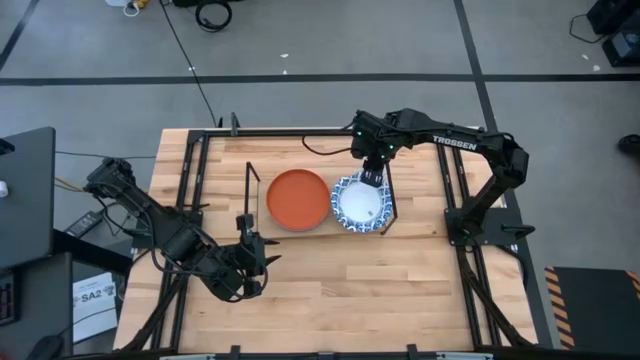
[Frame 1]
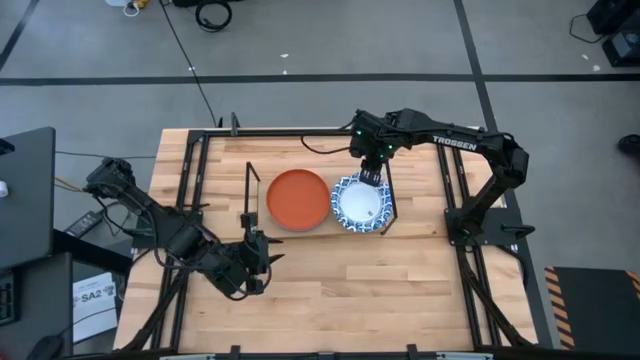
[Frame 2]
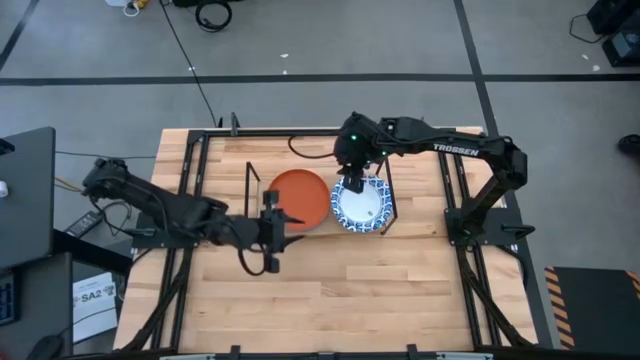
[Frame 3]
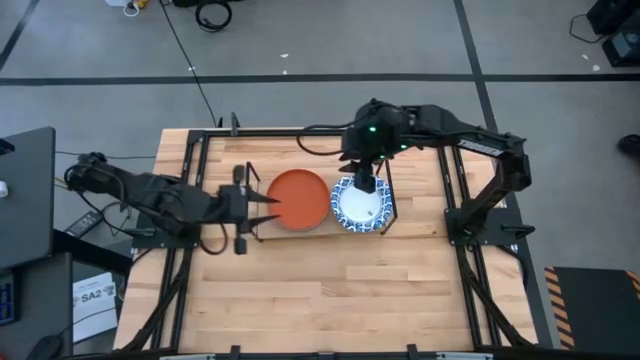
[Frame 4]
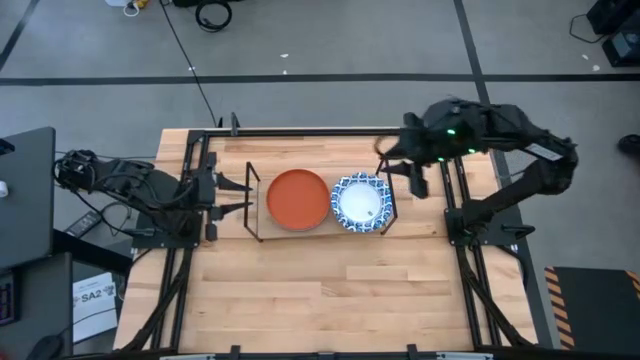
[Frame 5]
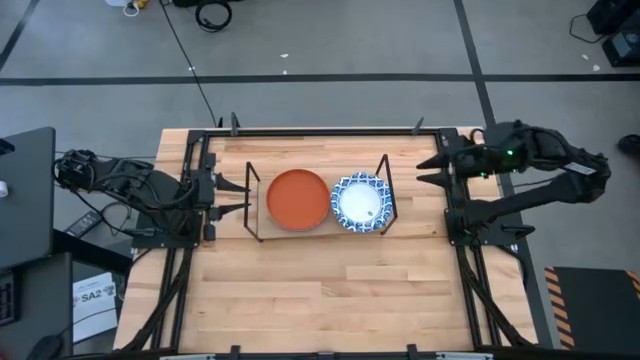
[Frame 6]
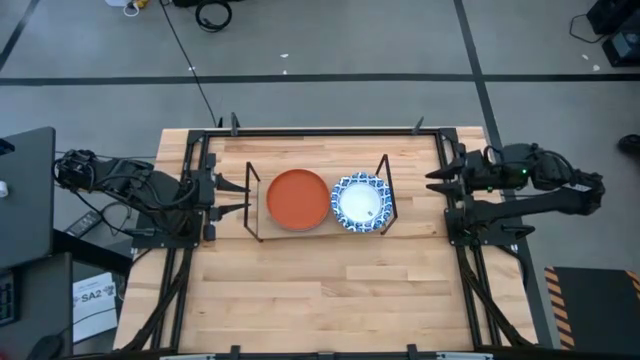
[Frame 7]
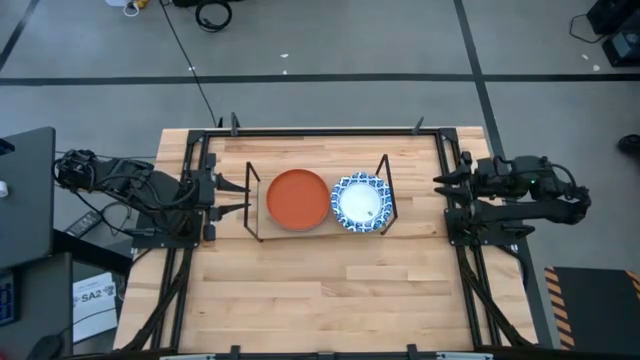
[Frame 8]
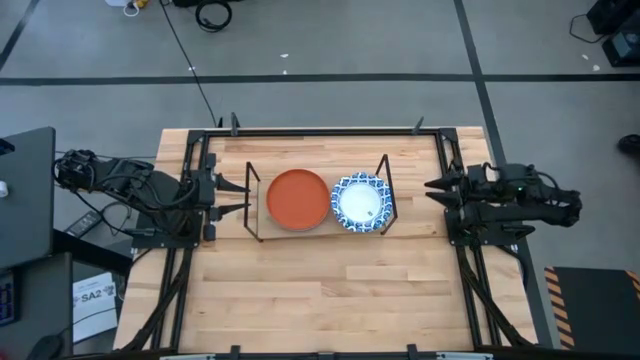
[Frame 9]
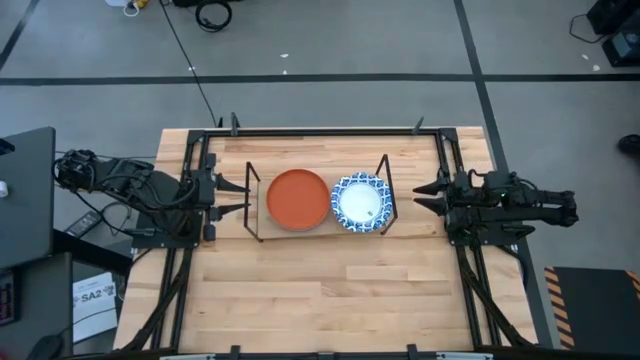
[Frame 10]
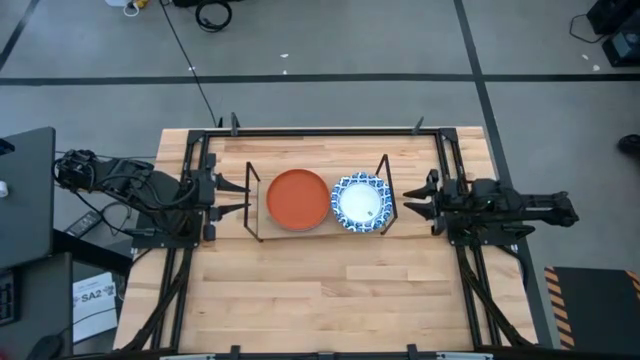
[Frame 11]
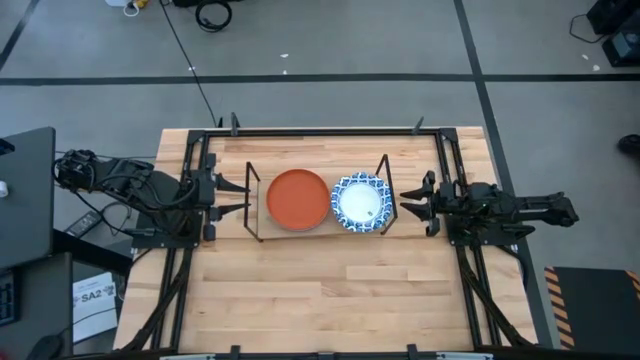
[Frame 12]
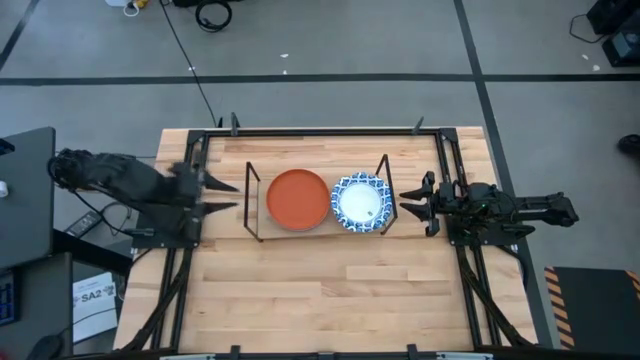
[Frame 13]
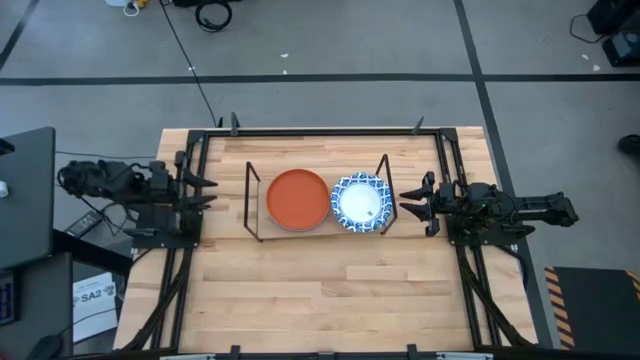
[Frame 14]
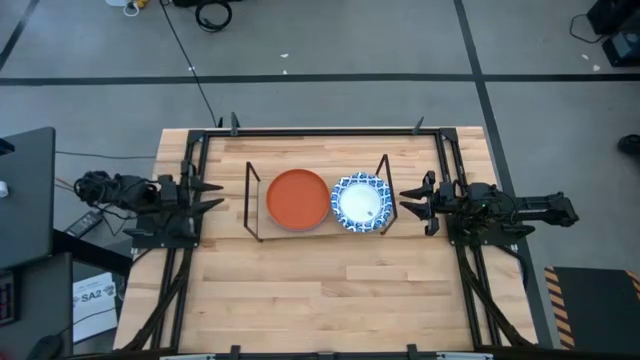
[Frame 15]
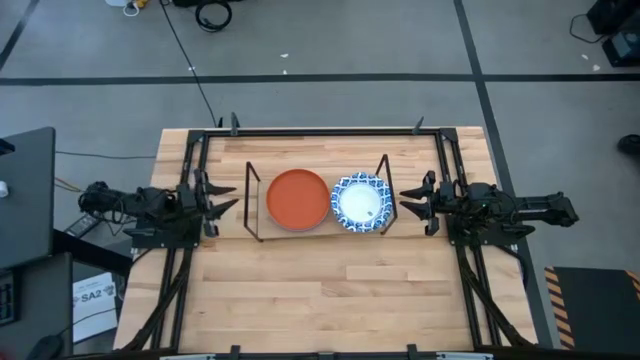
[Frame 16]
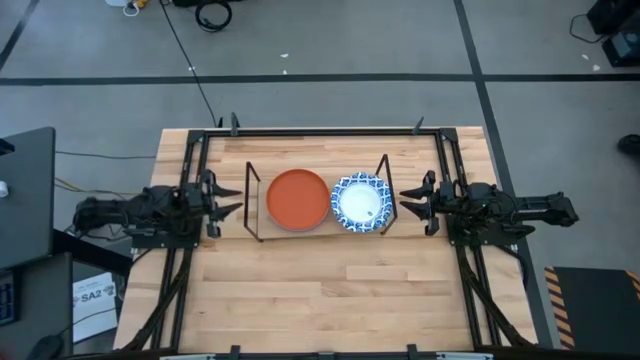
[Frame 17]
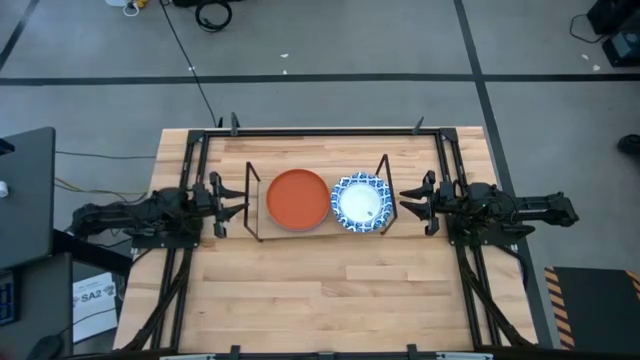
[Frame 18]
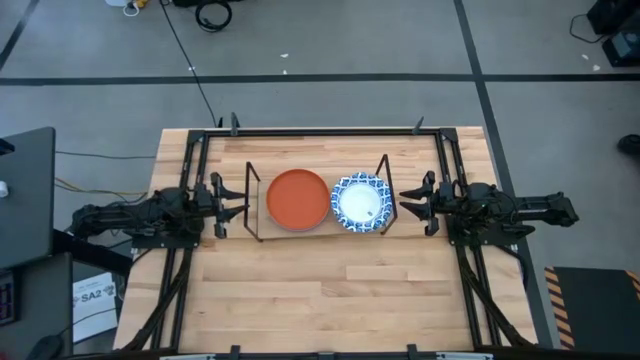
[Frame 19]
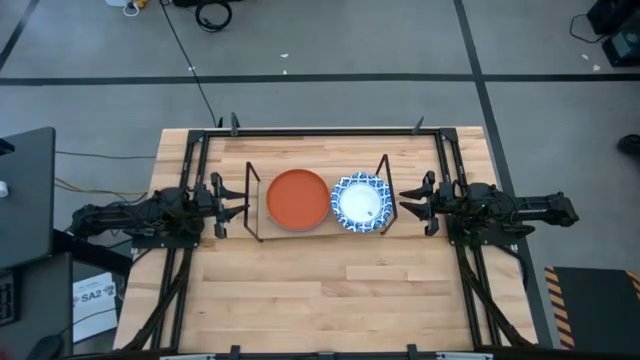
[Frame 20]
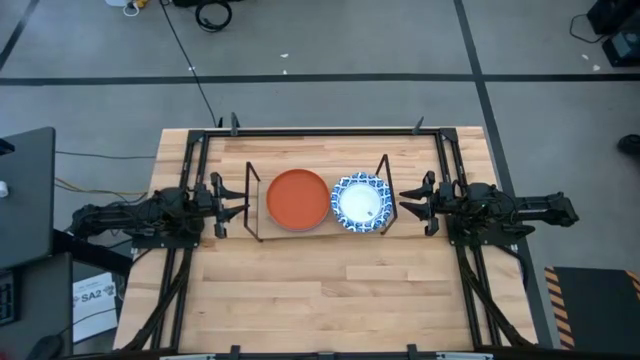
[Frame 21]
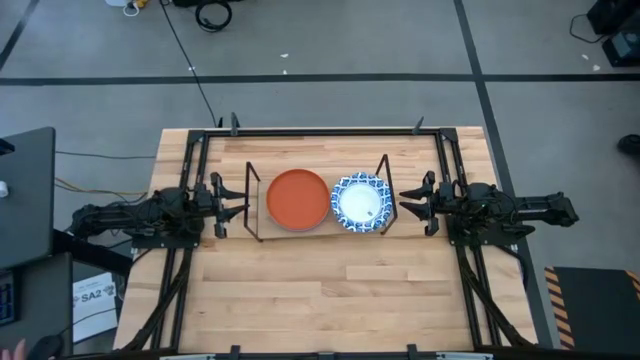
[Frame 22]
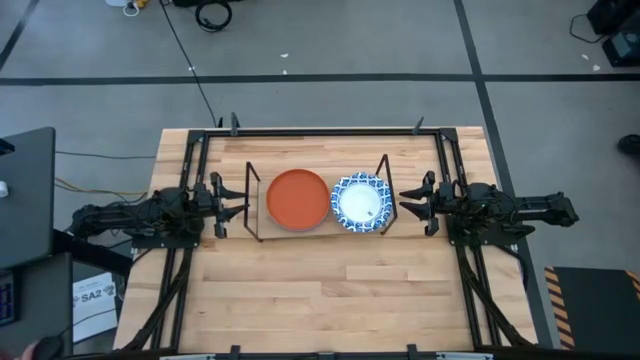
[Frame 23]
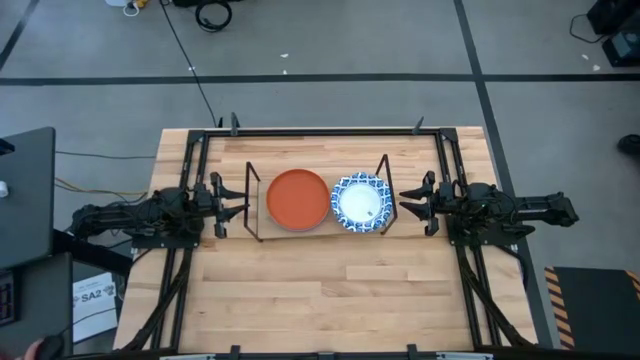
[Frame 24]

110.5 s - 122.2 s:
Task: Place and stack plates onto a shelf
Return to Home Position

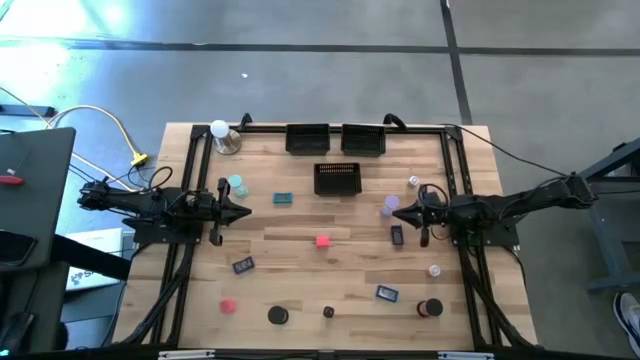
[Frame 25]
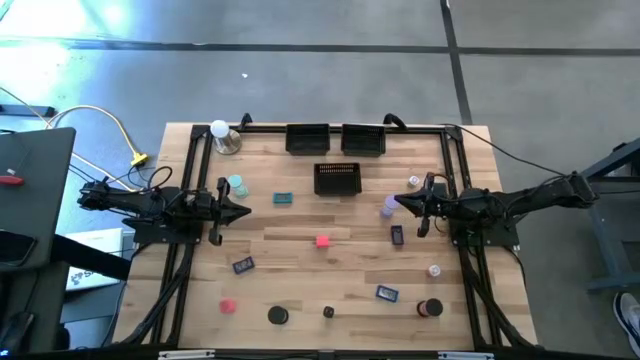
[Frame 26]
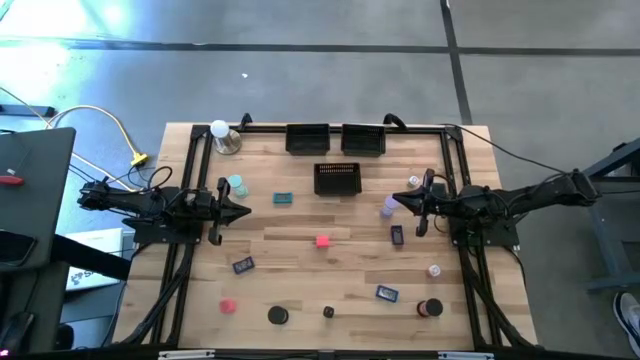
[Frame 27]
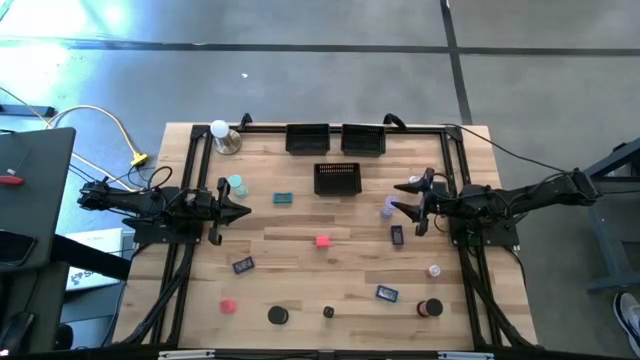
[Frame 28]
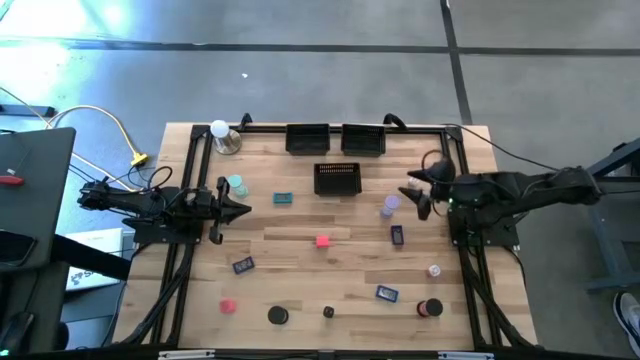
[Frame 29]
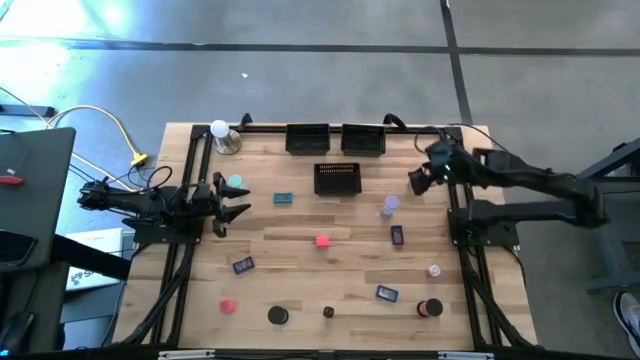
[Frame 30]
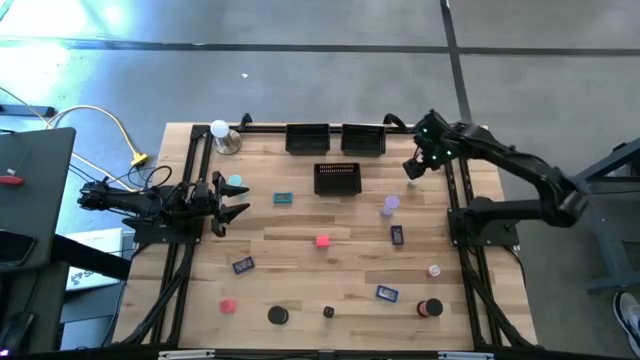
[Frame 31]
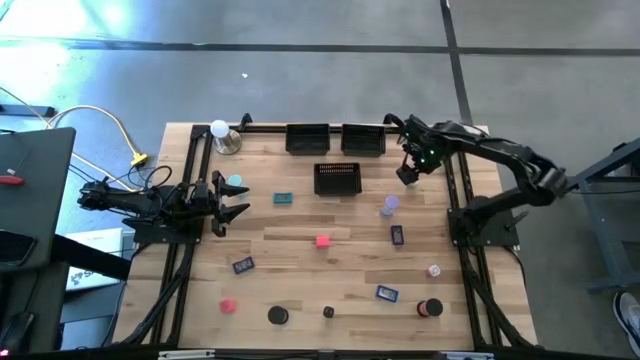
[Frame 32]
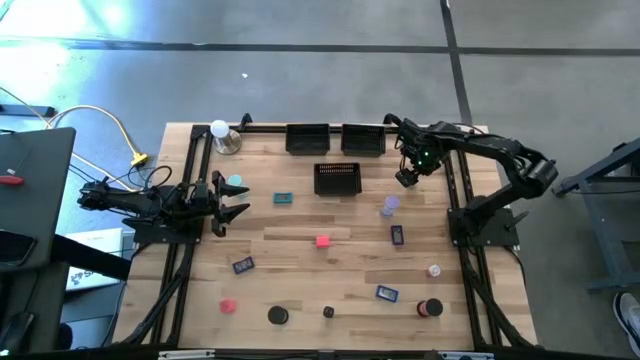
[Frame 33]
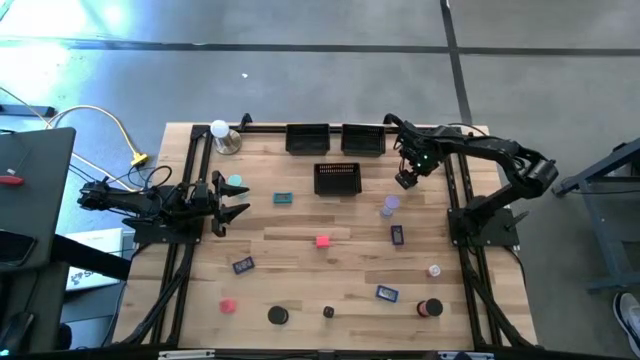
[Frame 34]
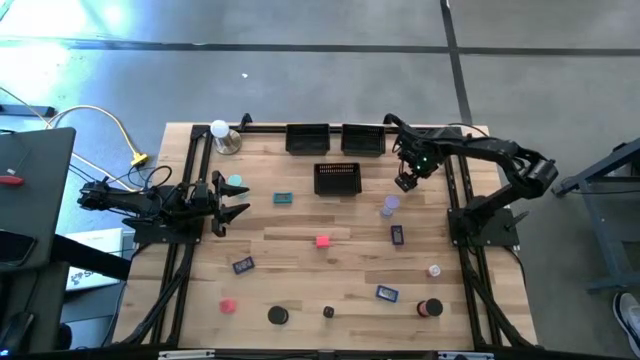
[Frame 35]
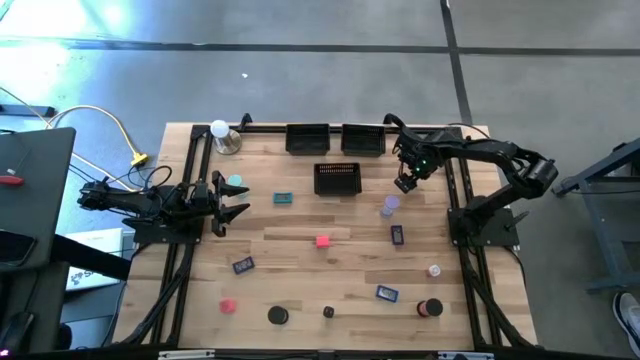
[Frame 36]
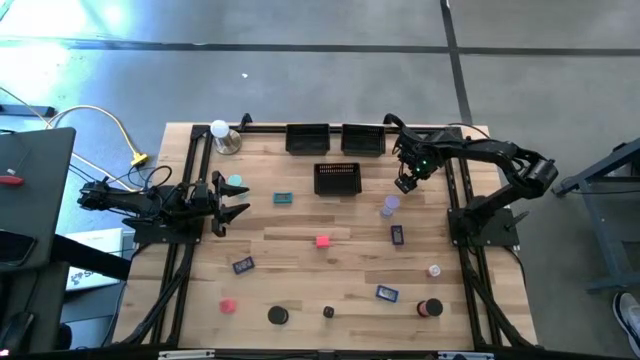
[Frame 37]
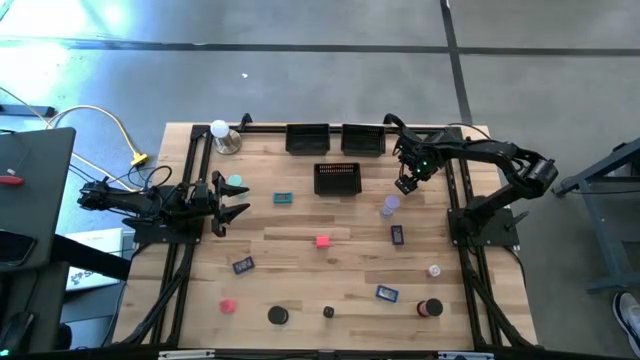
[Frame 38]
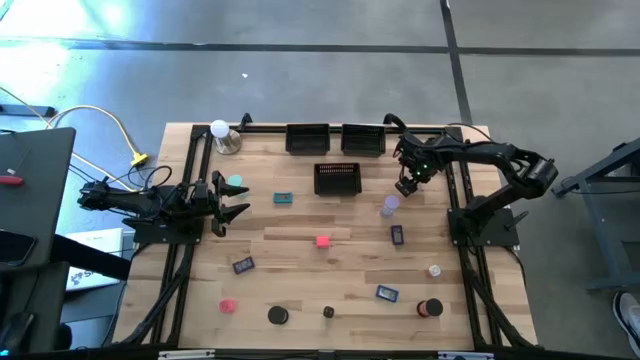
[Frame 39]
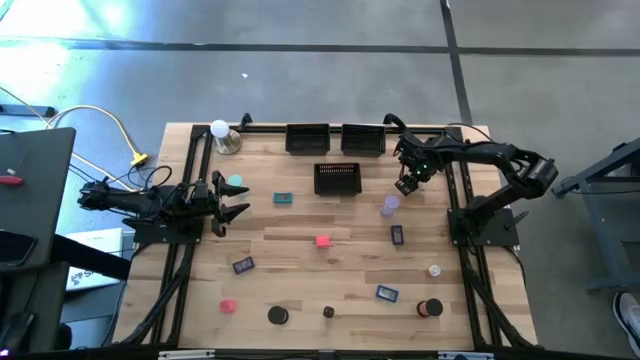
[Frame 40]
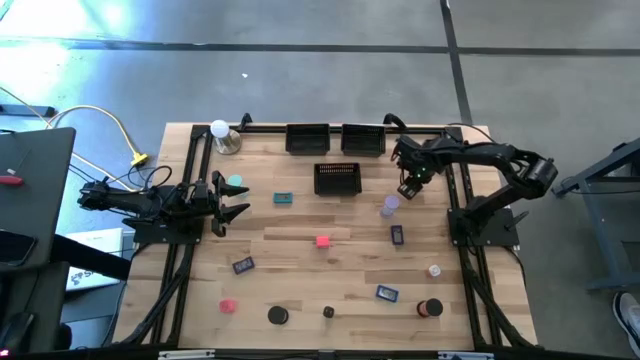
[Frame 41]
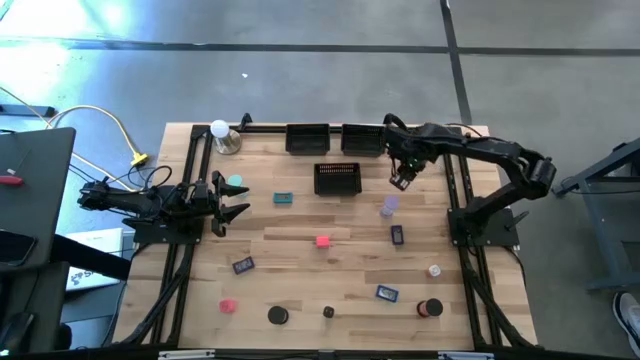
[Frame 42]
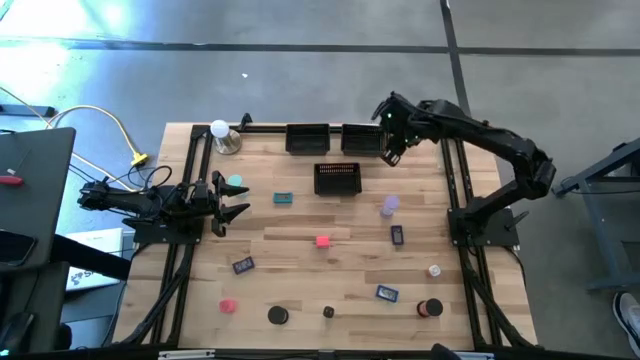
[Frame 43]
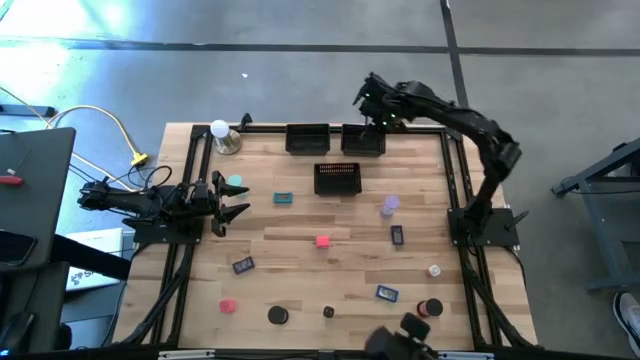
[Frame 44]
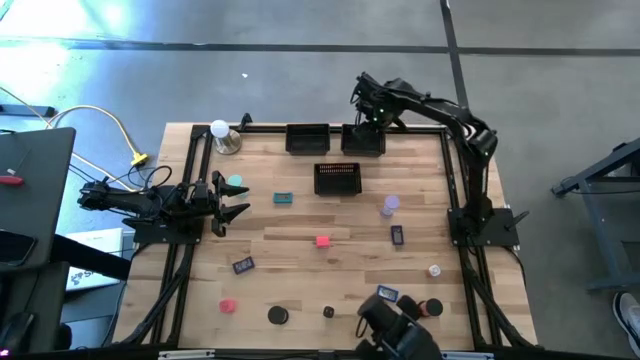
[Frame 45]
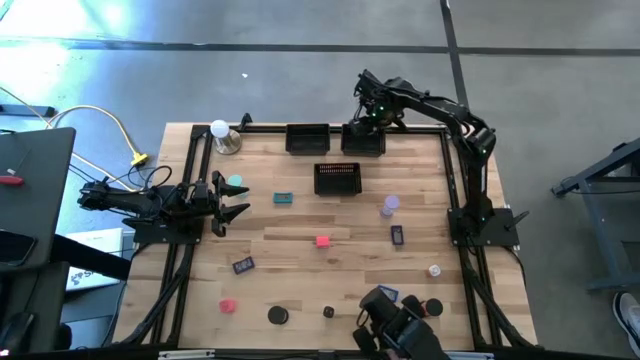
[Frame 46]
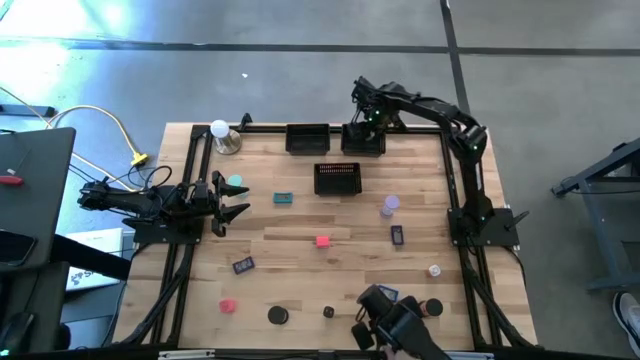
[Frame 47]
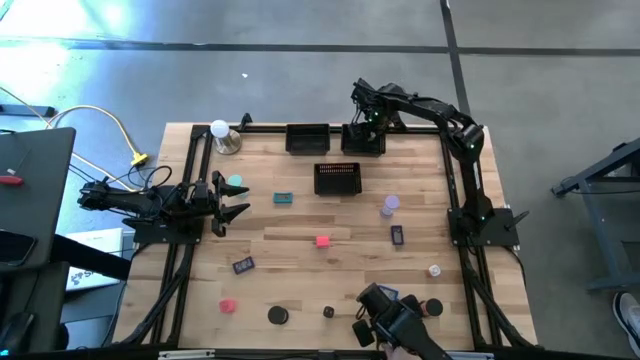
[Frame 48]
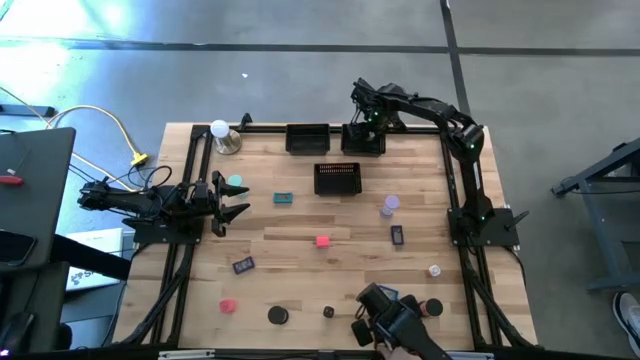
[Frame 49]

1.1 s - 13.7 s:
Task: Pick & Place Office items
Put the white green charger adapter into the top right black bin
